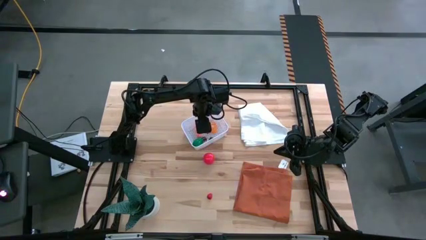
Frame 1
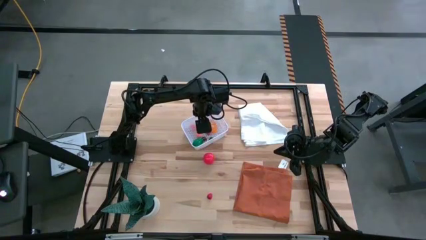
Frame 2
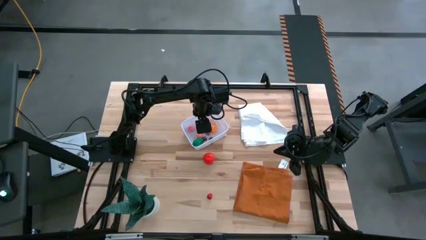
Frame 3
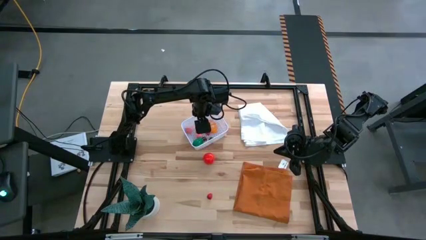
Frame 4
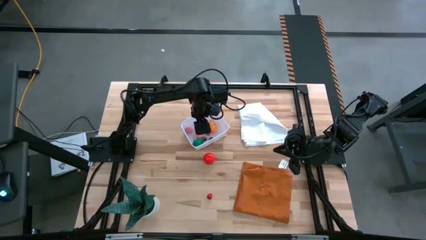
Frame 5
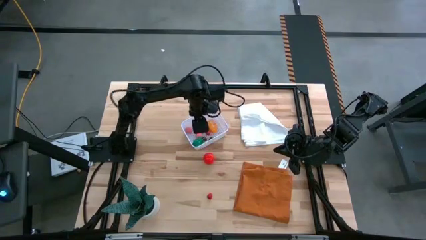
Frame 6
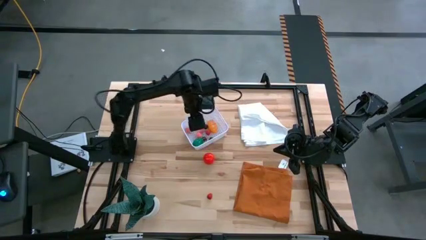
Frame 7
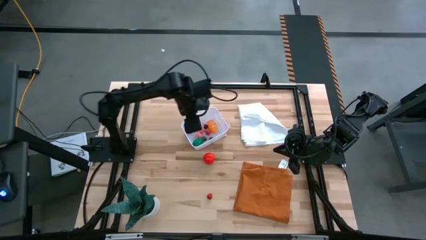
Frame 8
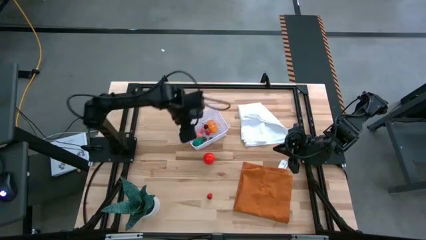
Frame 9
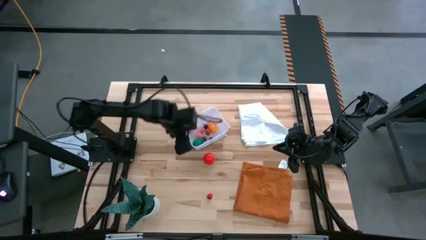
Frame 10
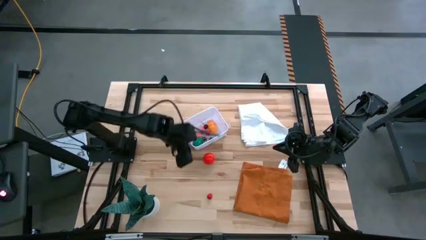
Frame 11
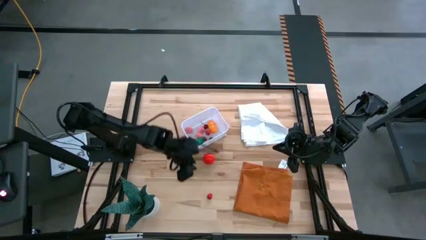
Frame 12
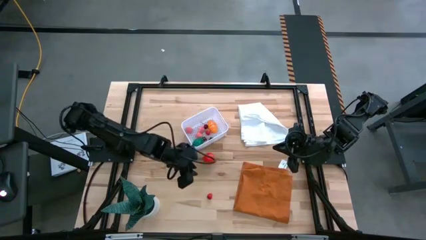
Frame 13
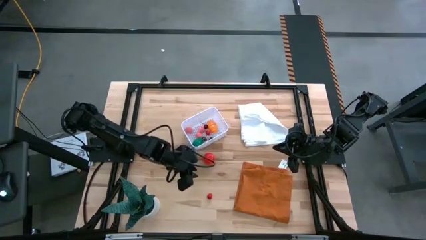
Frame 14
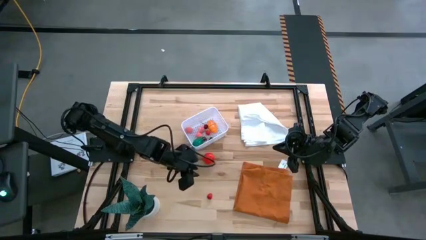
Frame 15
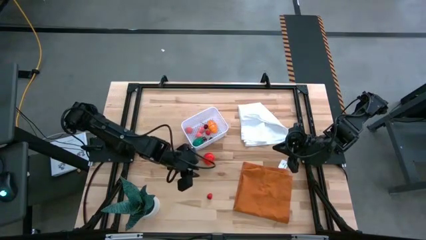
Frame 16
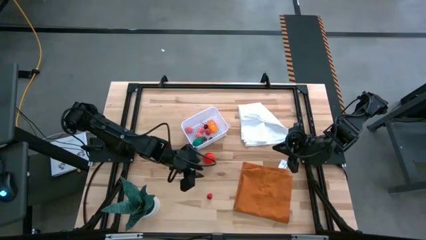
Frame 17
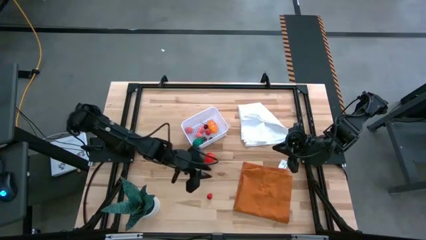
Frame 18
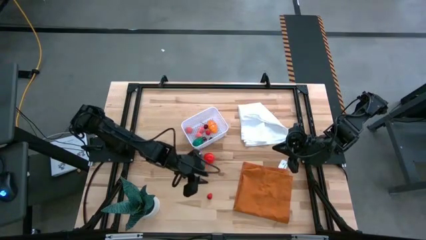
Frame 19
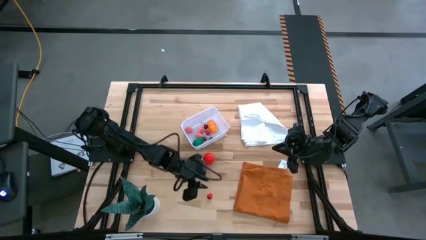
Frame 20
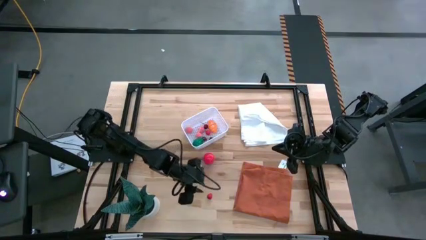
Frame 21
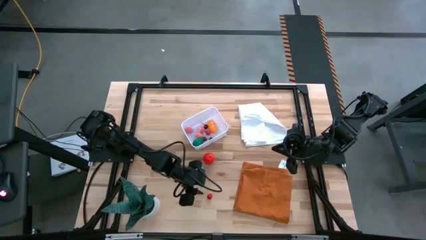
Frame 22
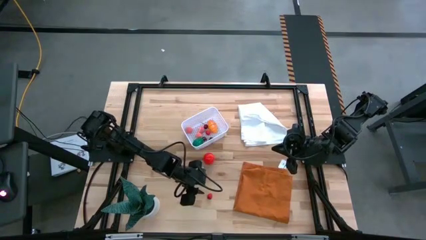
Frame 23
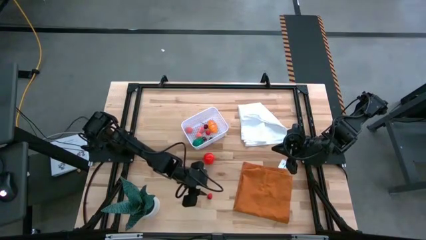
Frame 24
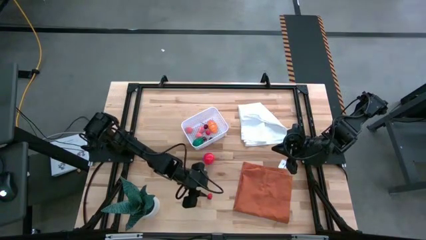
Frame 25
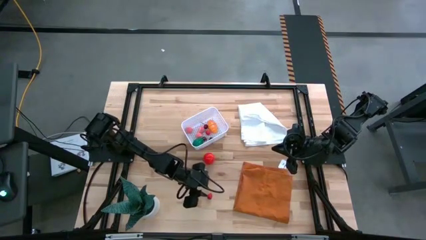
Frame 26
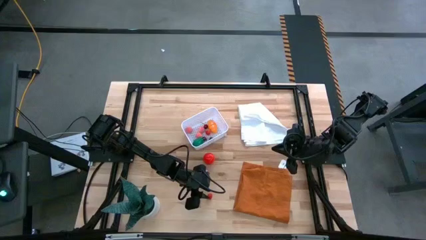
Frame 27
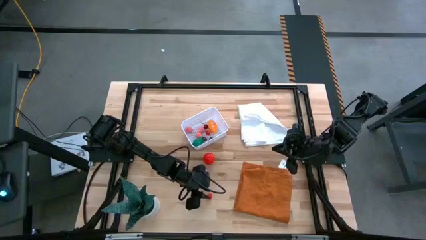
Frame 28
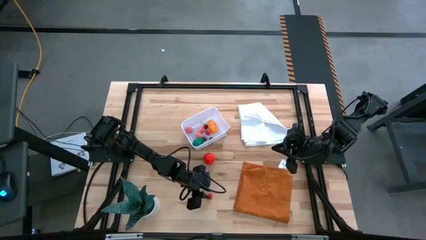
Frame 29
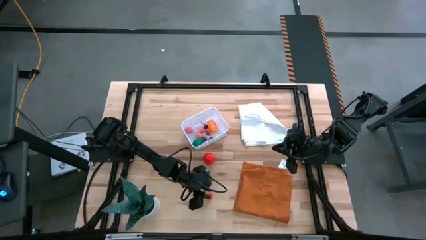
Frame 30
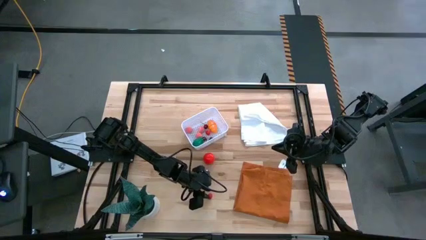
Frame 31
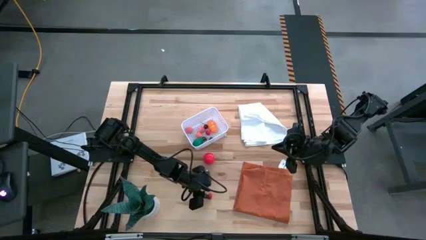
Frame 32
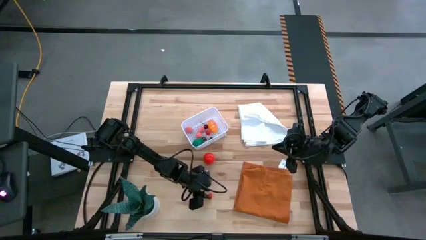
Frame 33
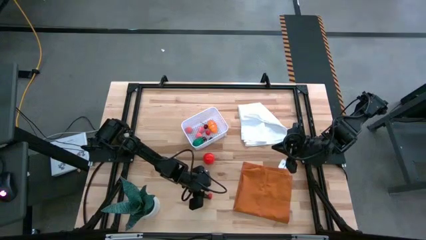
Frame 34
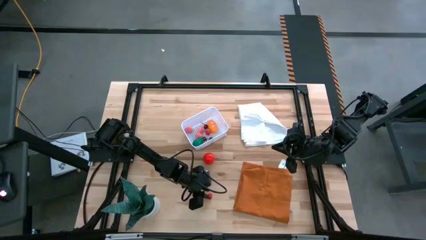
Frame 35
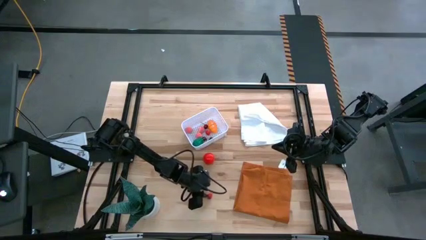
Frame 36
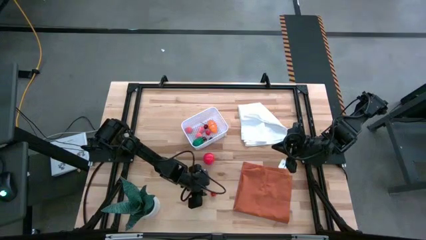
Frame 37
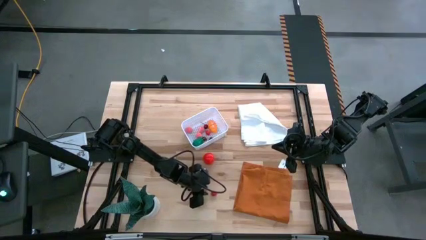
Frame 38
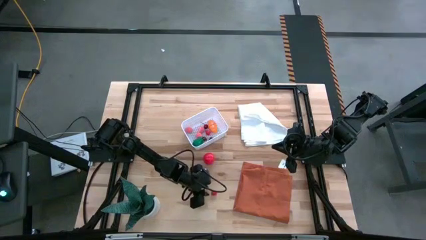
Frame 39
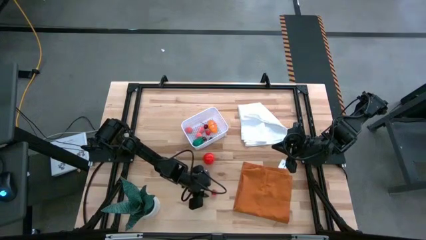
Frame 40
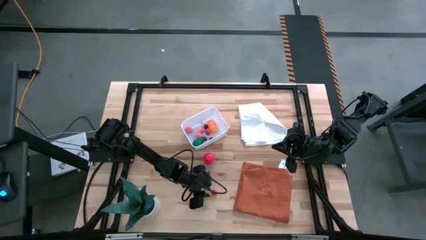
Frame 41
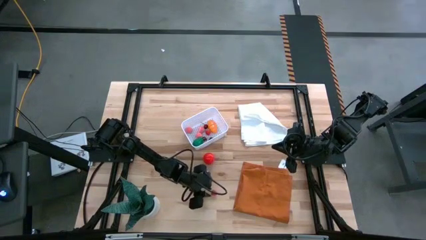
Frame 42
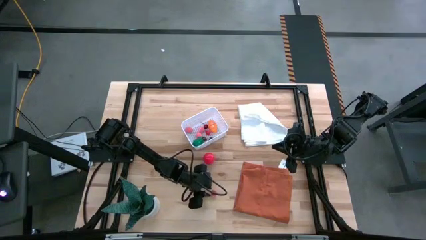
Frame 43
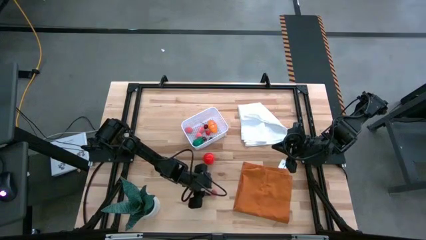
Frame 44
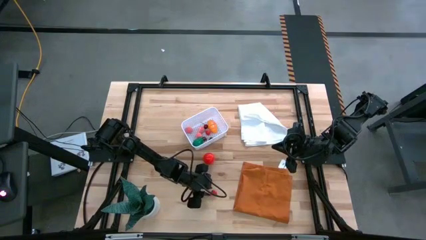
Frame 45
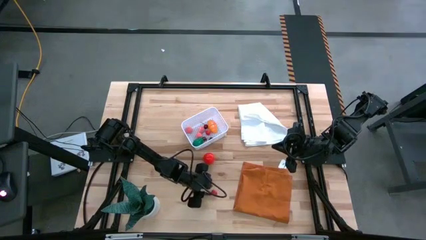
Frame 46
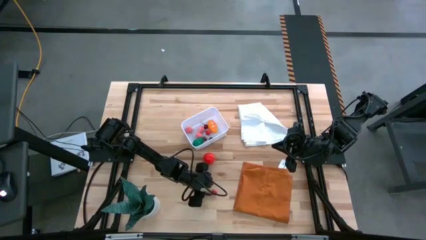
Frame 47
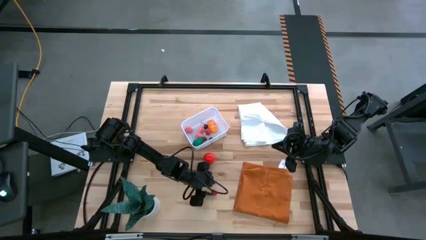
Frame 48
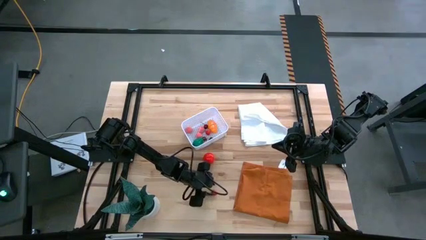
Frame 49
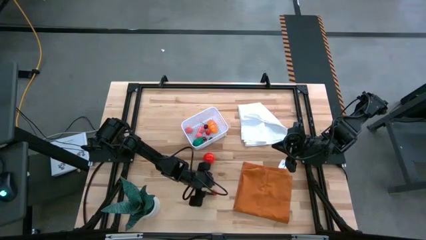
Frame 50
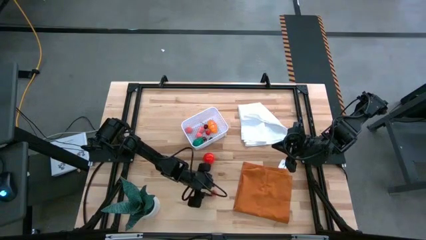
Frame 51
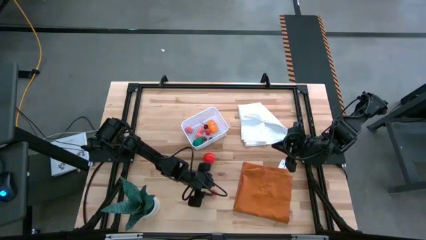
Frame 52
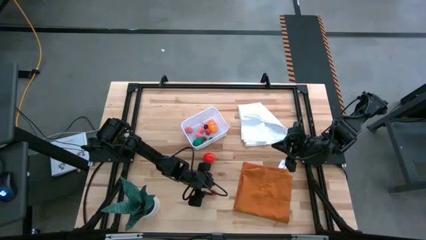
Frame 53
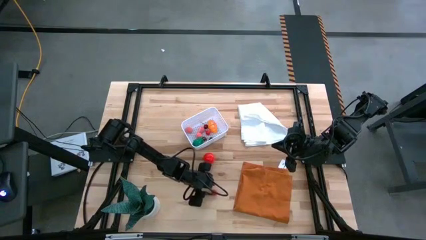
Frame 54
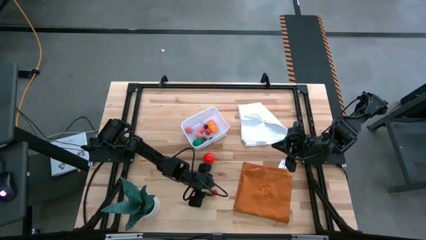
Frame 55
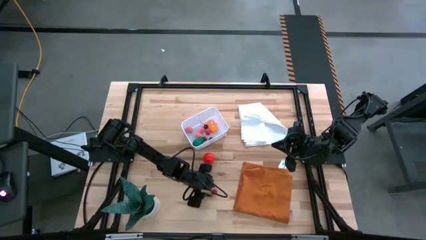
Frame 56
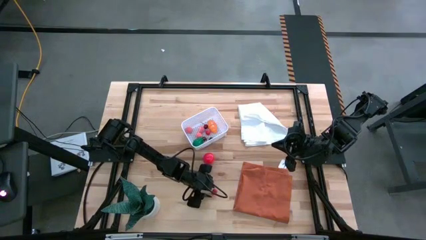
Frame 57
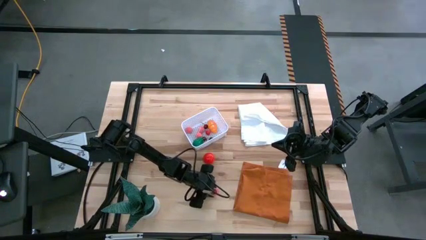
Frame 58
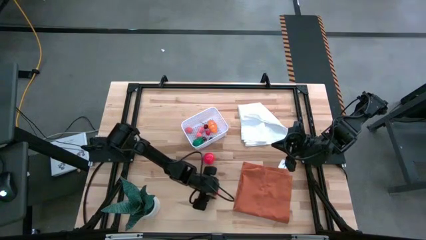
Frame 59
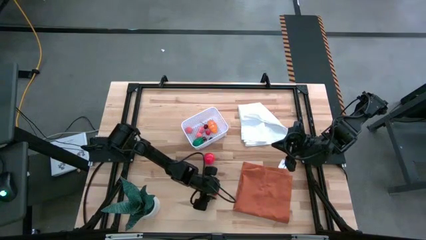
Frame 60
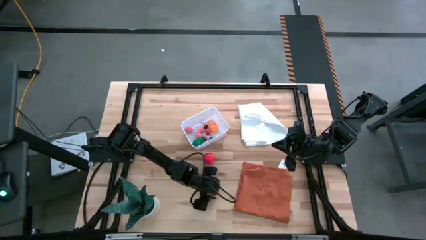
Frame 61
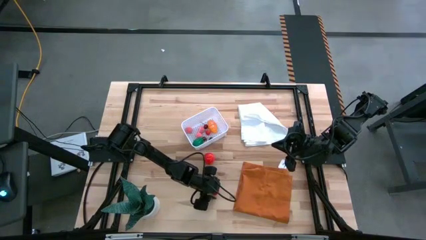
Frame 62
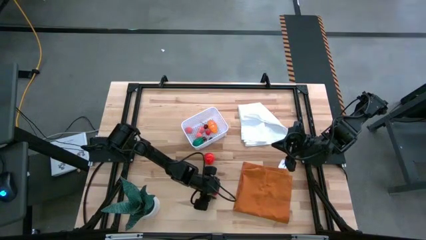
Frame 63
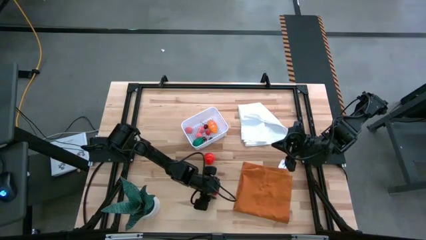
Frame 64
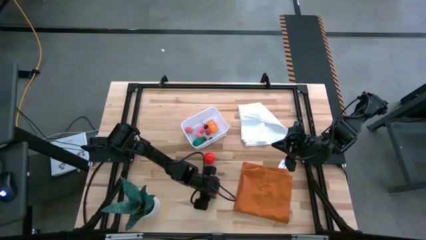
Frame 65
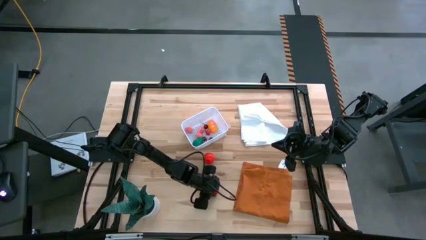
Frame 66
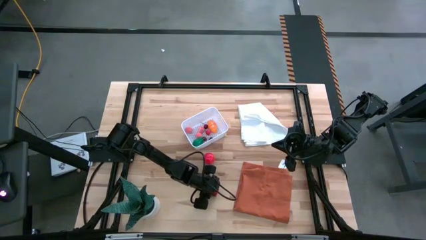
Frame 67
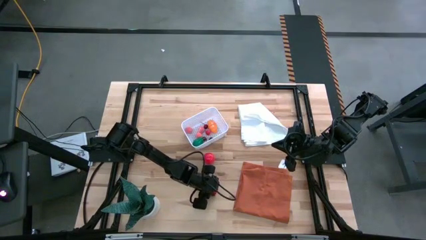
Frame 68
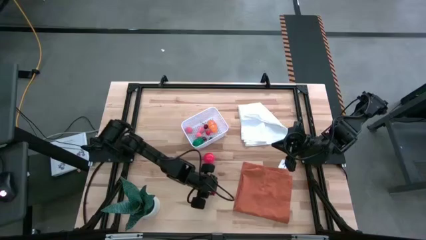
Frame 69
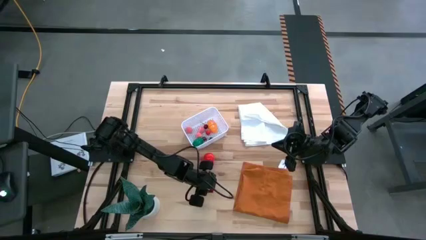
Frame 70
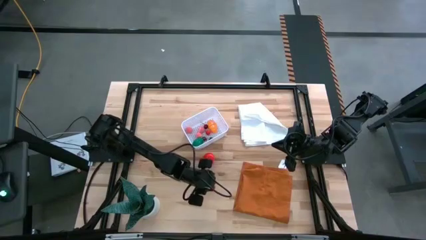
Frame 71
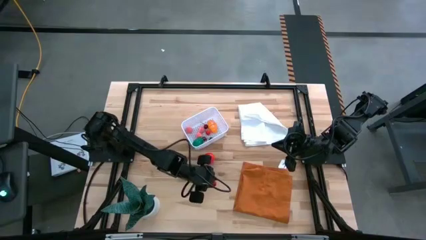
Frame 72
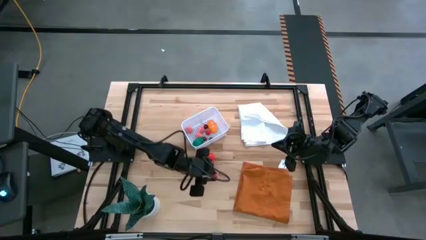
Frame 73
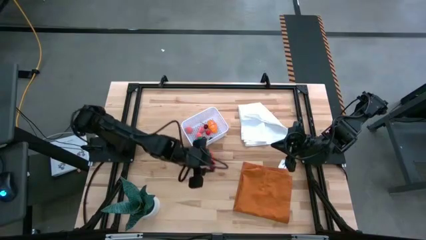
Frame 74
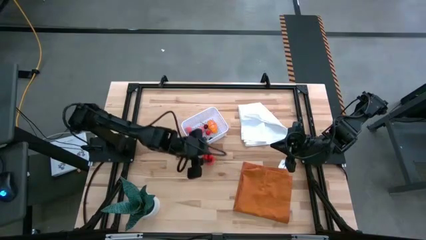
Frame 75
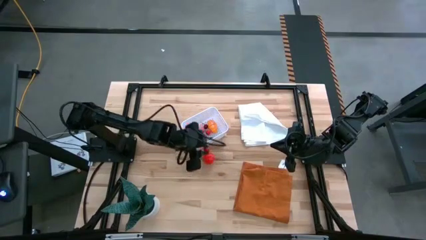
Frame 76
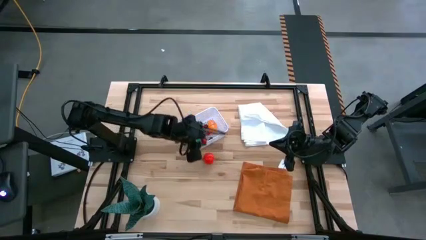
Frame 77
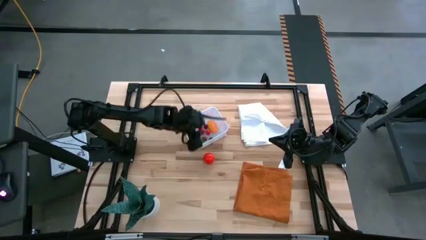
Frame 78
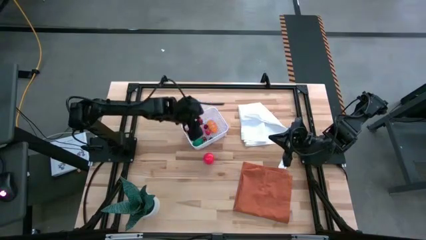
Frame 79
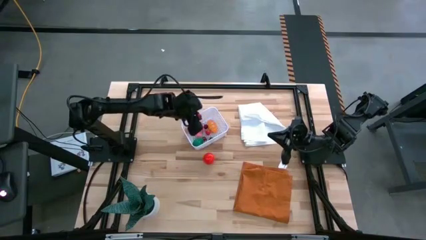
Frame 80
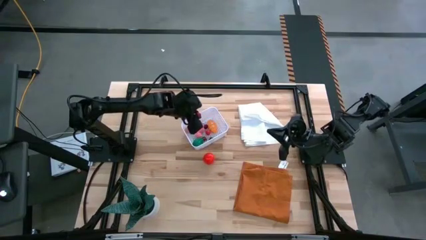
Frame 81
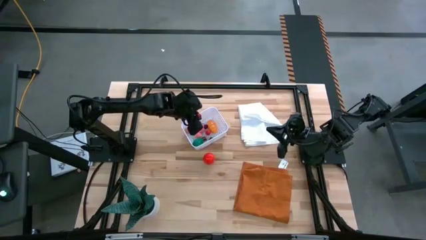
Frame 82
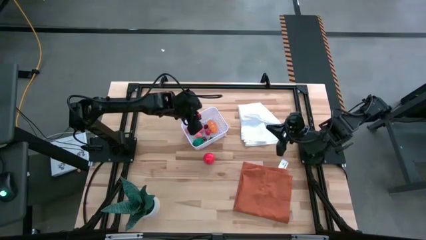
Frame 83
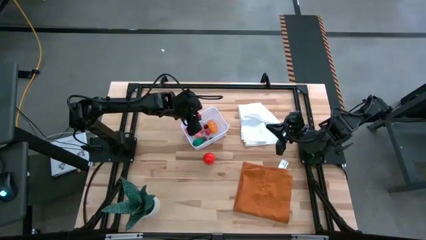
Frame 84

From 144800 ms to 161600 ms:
Task: Pick and placing Produce into tupperware
Put the raspberry in the basket
